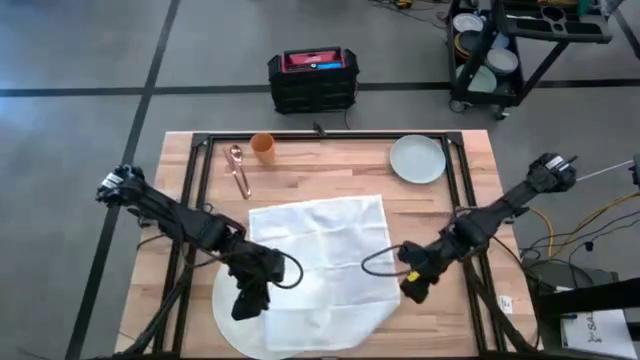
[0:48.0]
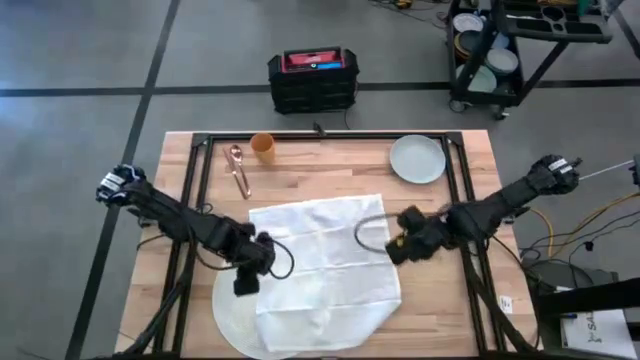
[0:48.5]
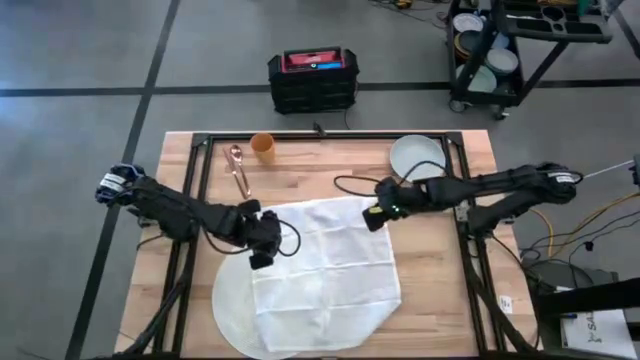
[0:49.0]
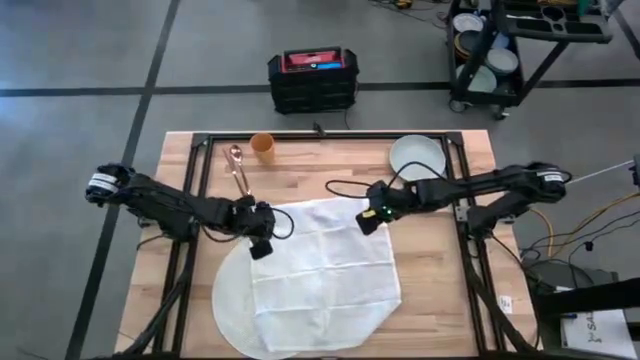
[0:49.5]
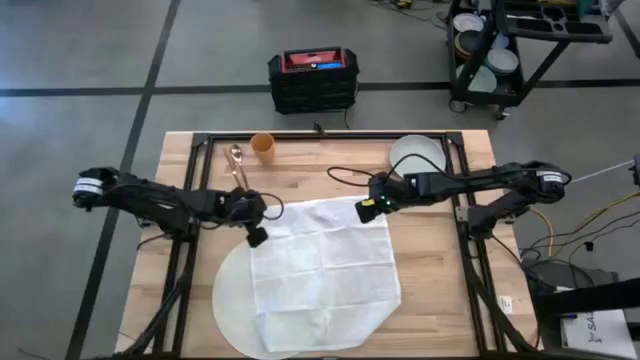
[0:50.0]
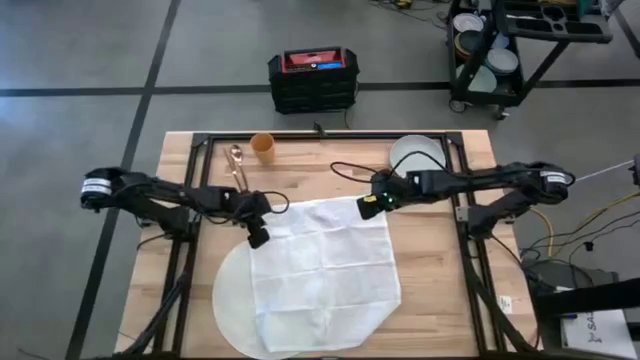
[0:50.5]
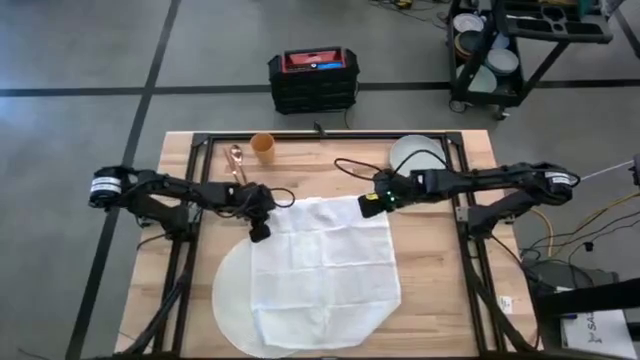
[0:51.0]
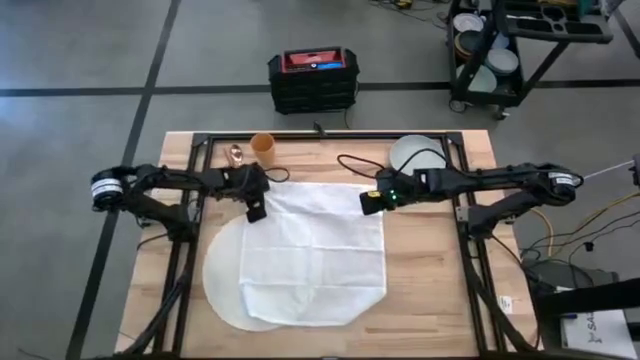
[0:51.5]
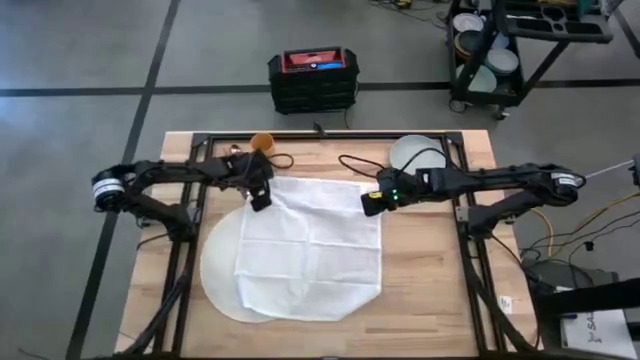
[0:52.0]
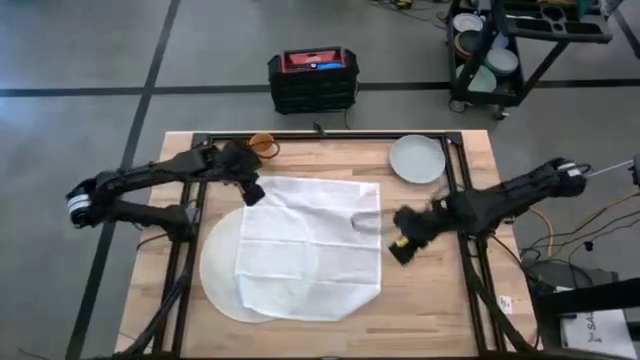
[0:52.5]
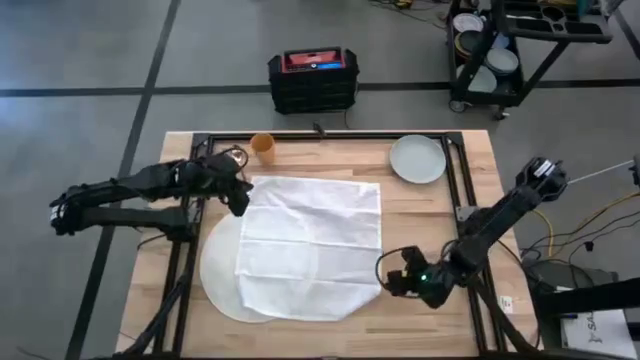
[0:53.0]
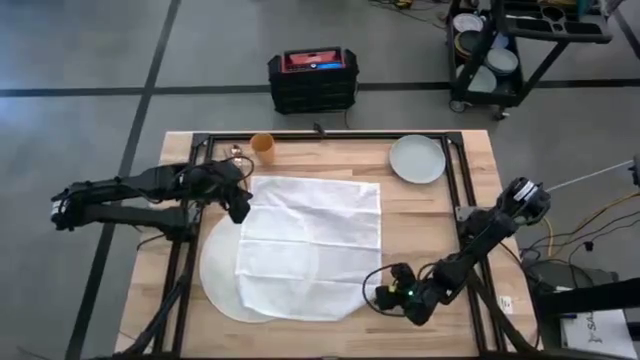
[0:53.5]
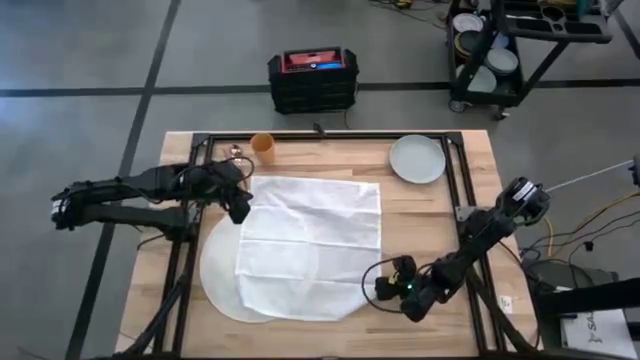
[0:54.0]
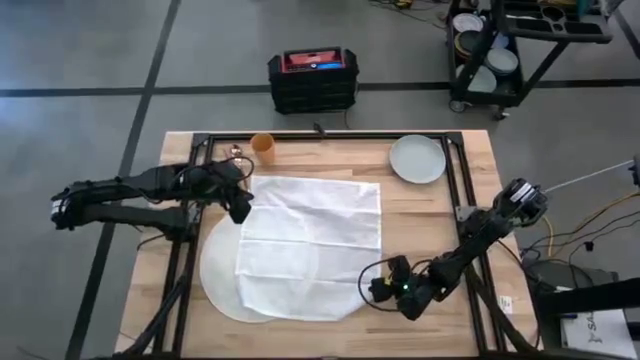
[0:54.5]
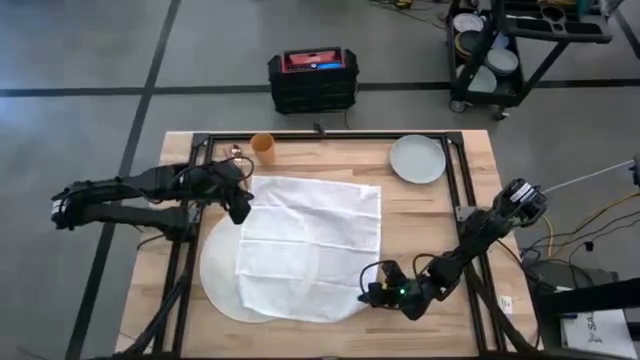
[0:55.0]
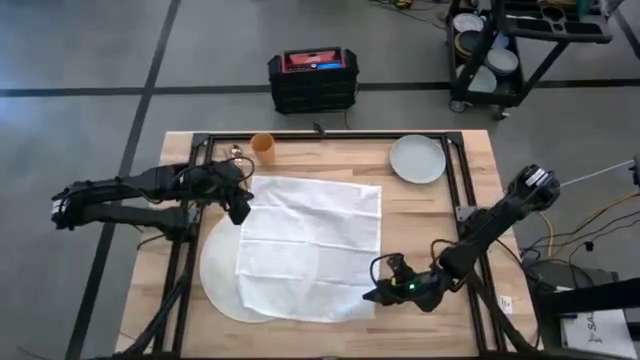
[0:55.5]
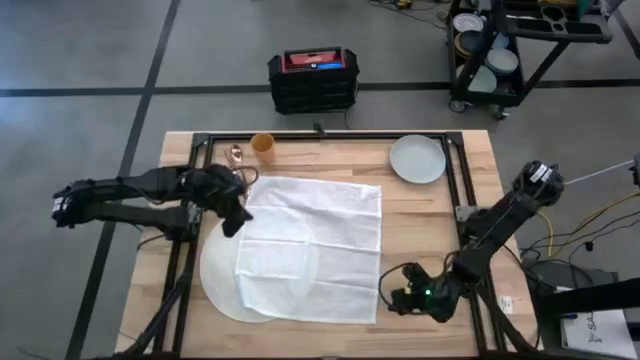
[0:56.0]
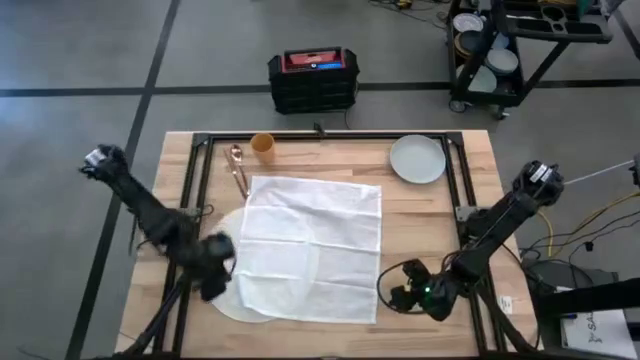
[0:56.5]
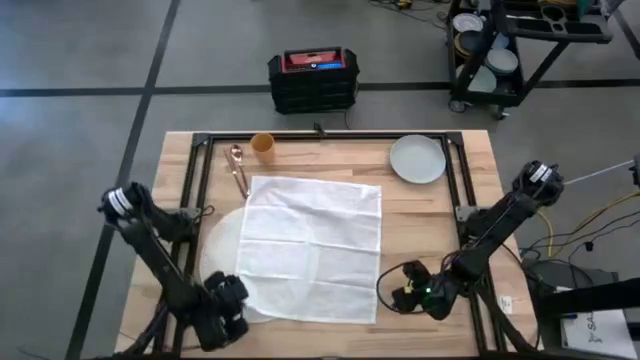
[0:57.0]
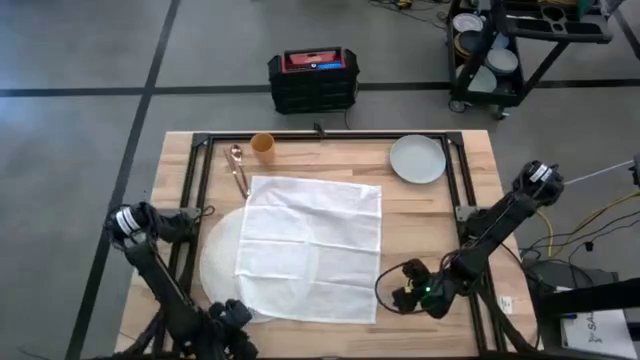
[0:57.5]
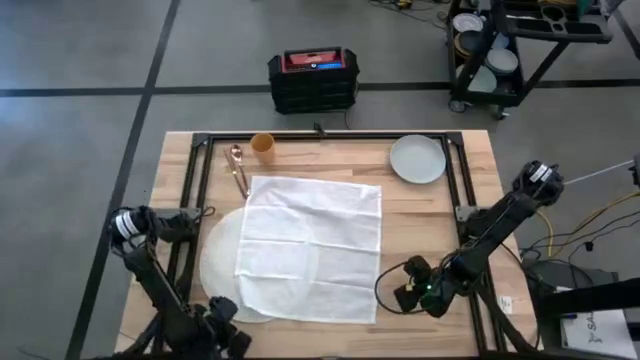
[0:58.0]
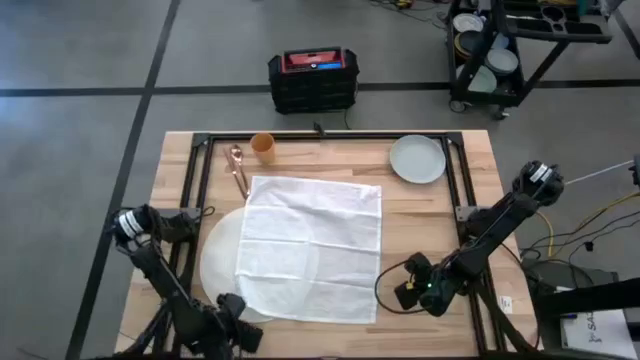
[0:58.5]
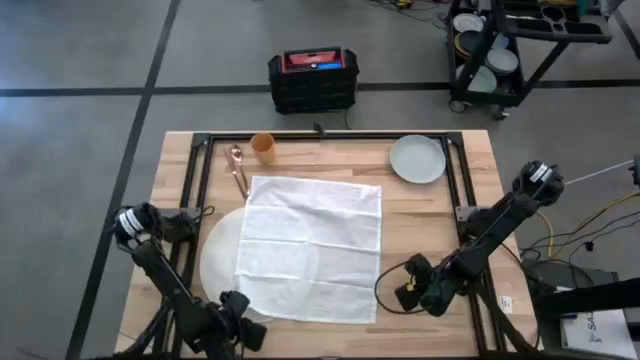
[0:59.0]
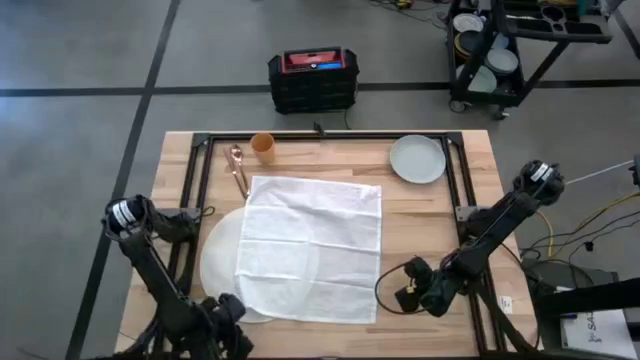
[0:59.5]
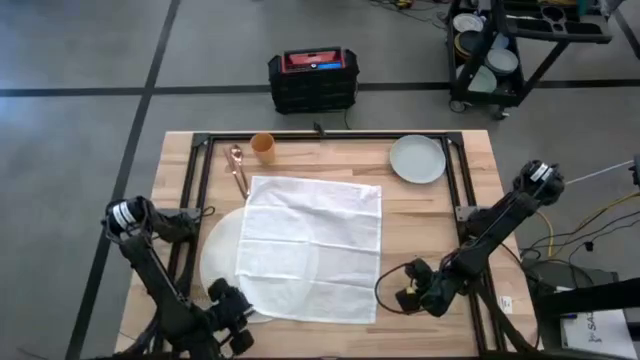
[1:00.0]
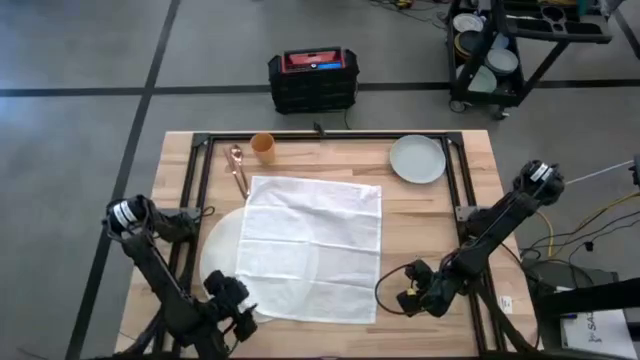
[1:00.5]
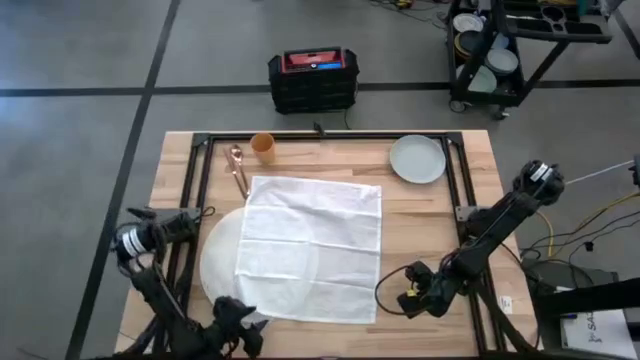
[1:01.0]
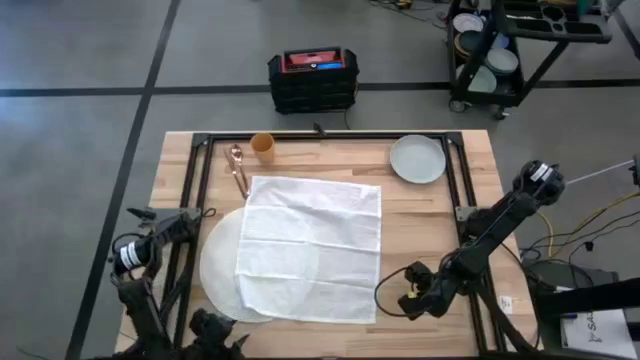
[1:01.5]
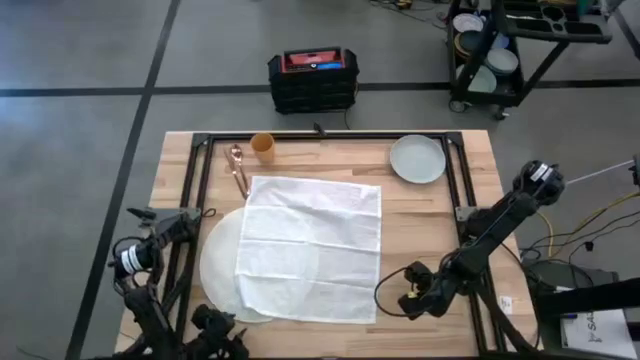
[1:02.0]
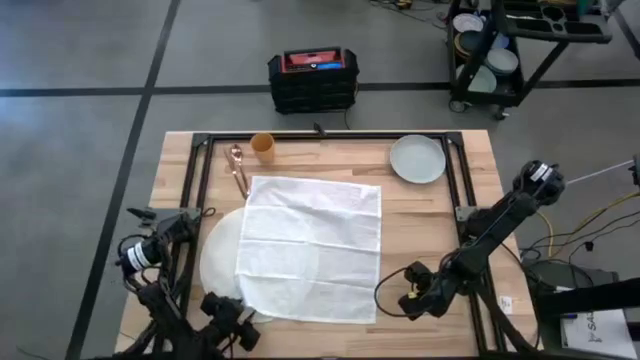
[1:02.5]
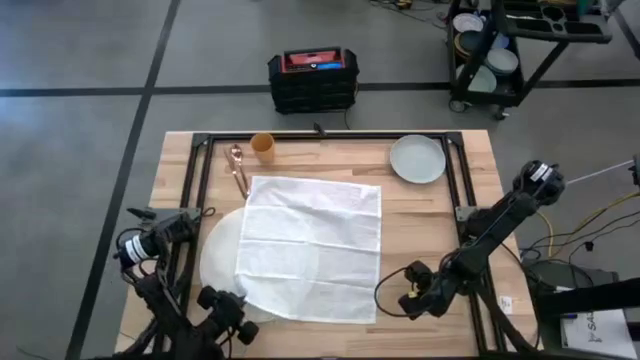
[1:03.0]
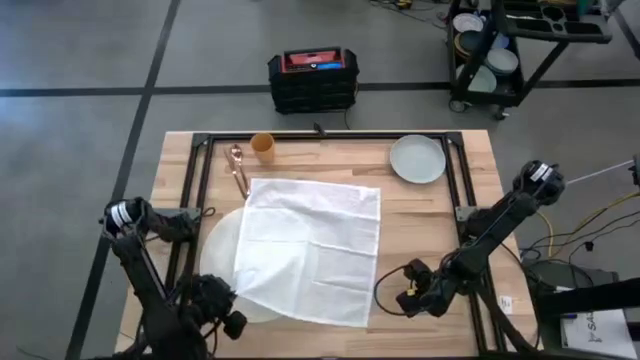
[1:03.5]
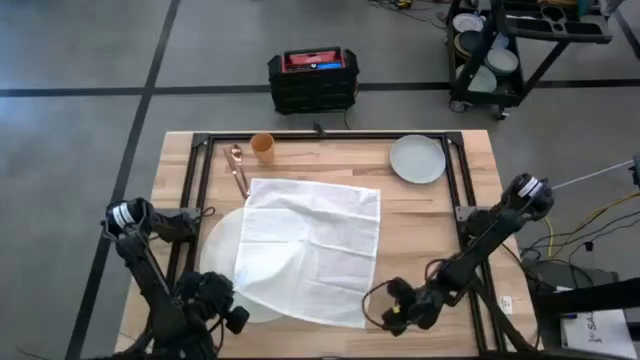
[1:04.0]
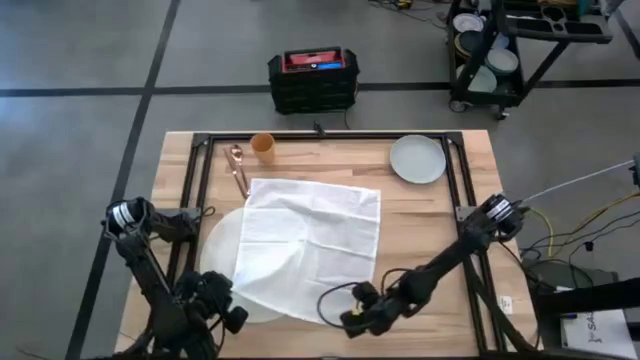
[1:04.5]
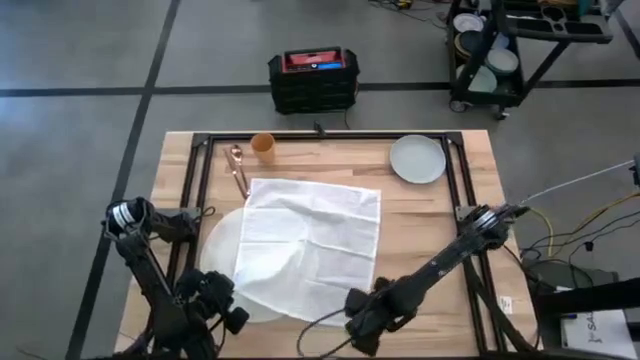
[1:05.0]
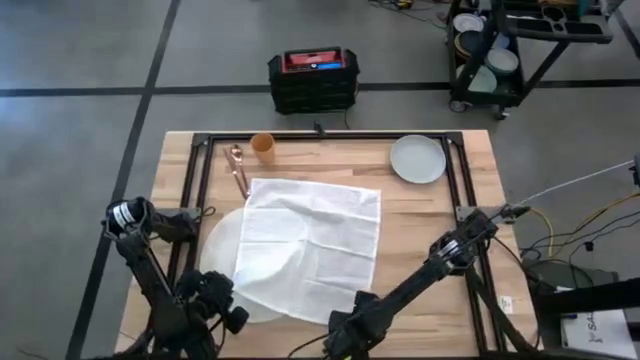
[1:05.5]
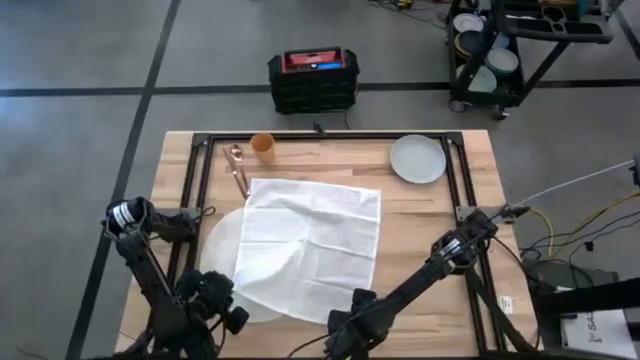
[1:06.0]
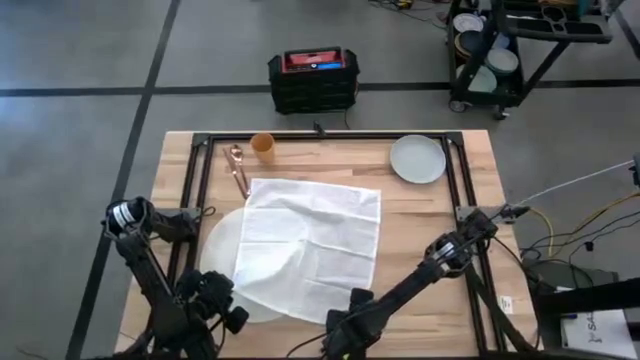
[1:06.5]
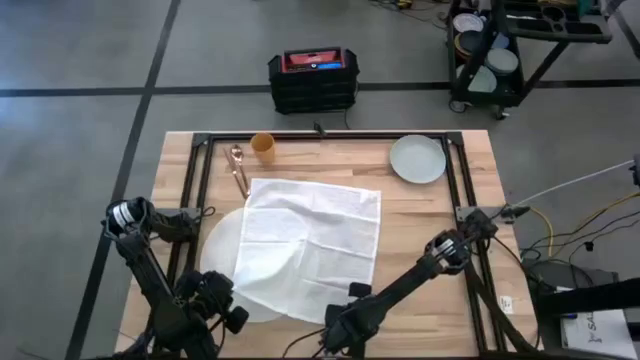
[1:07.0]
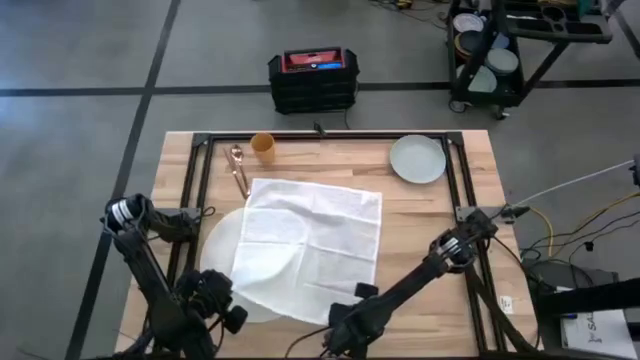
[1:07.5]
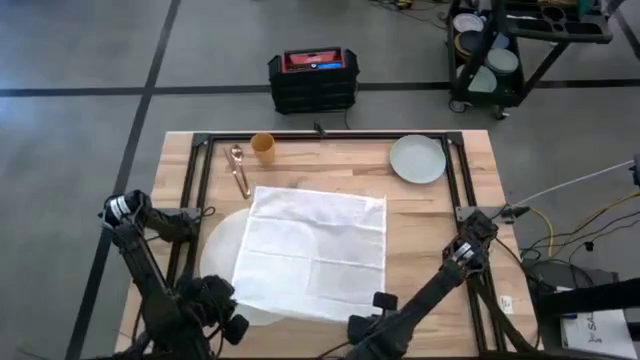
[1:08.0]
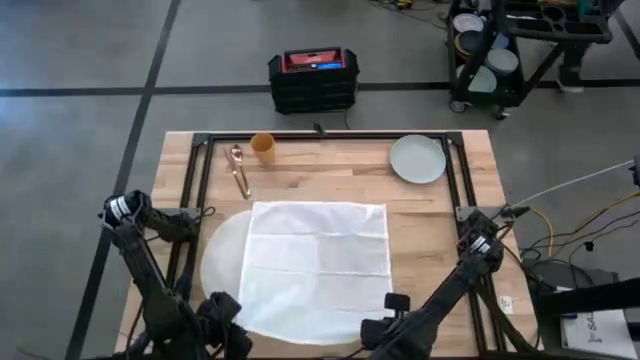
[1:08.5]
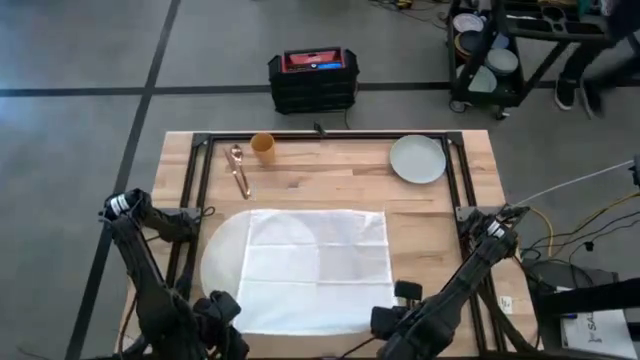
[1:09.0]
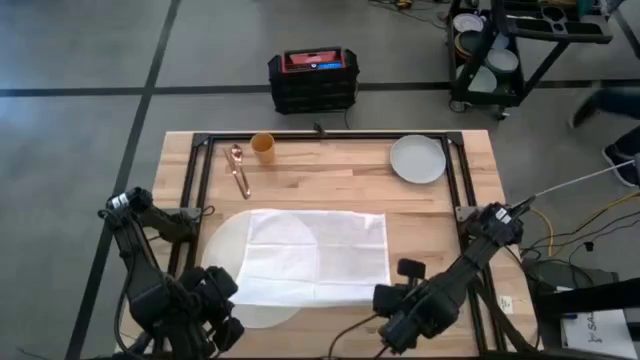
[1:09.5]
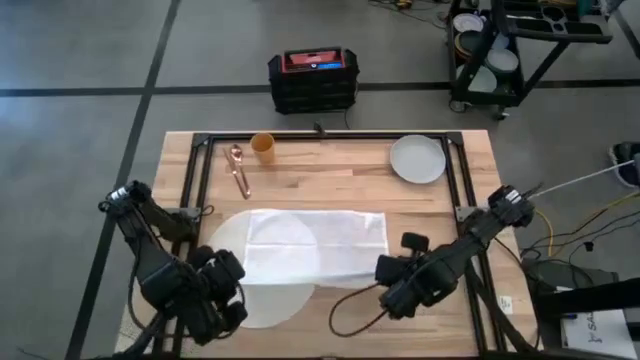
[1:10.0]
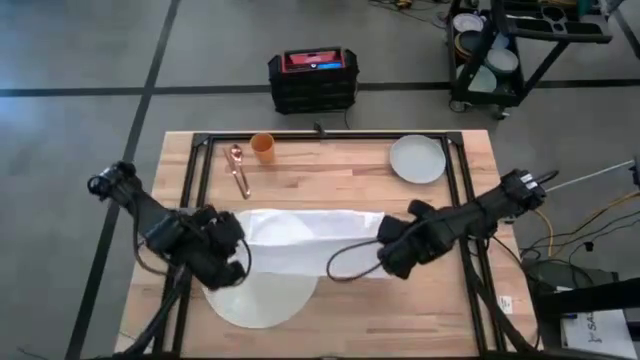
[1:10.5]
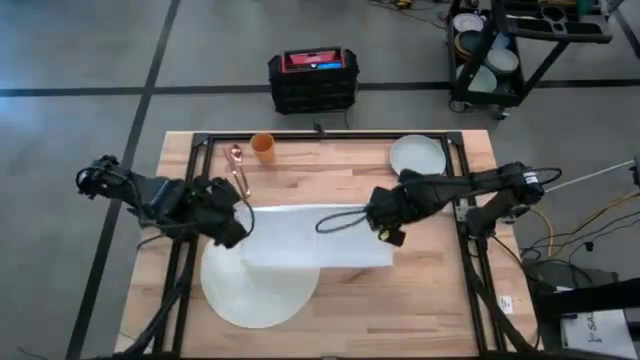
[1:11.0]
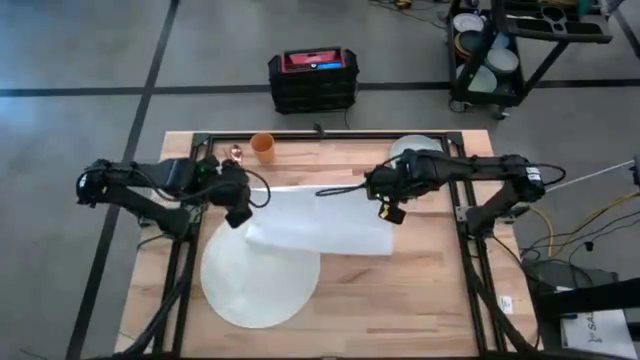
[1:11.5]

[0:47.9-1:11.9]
Task: Set table place
Fold the white napkin
